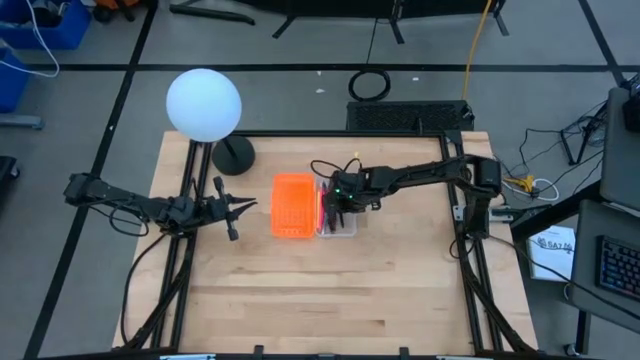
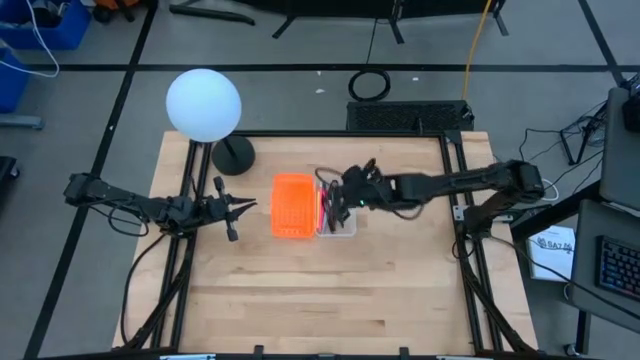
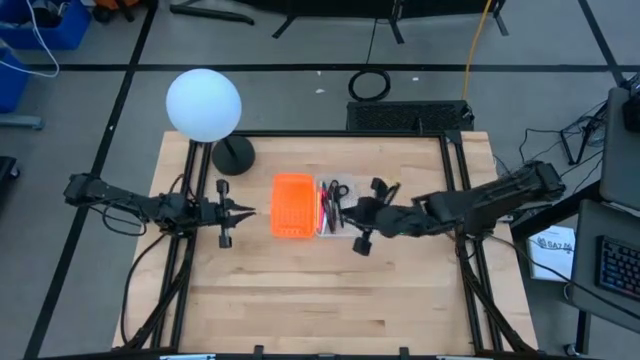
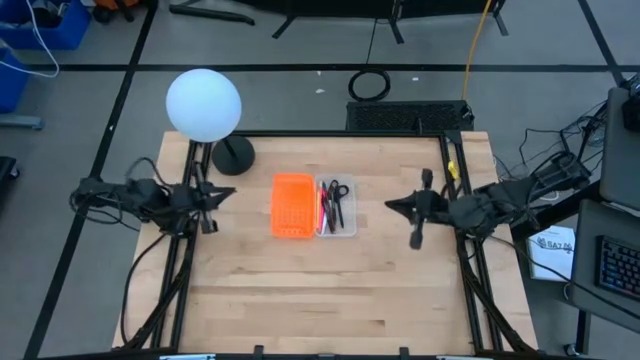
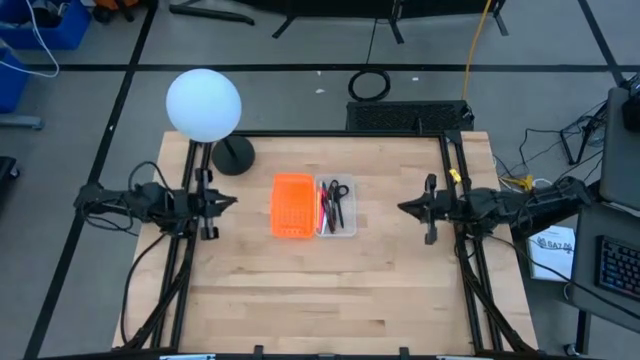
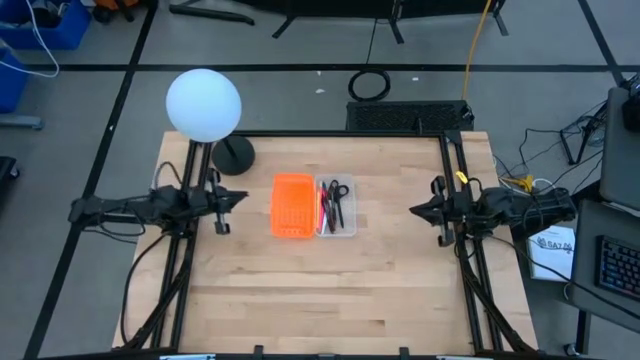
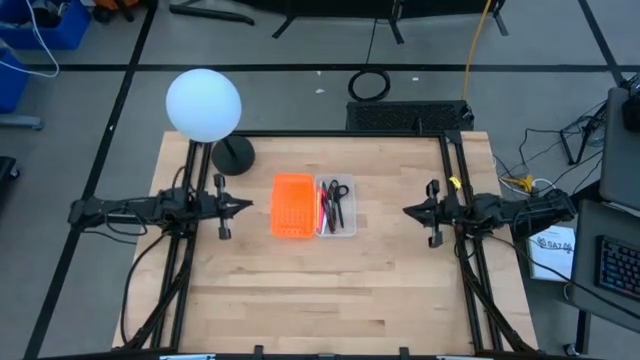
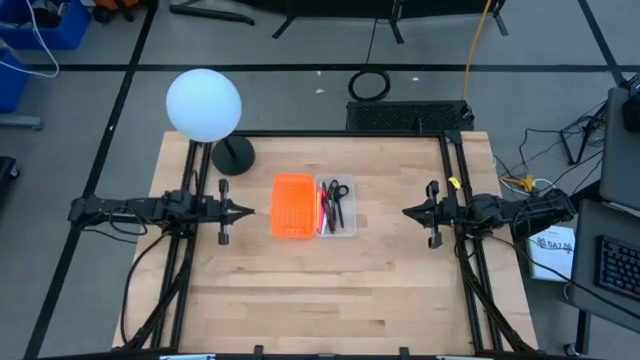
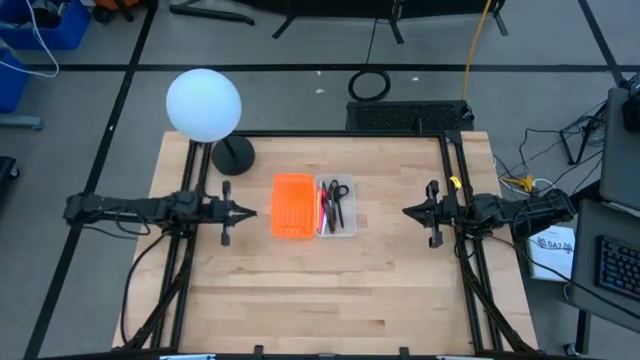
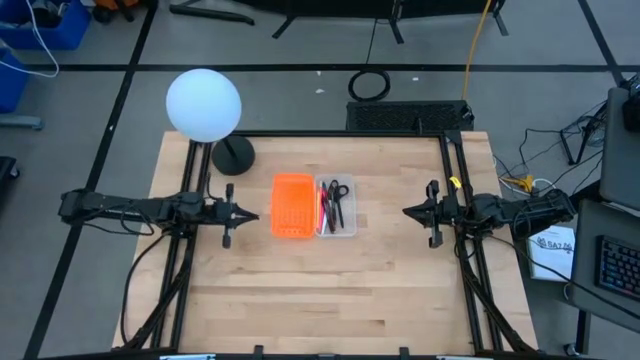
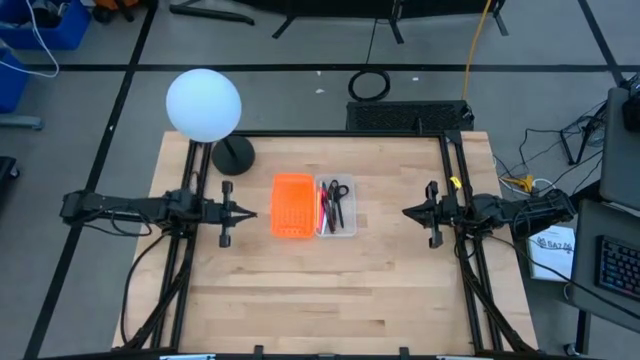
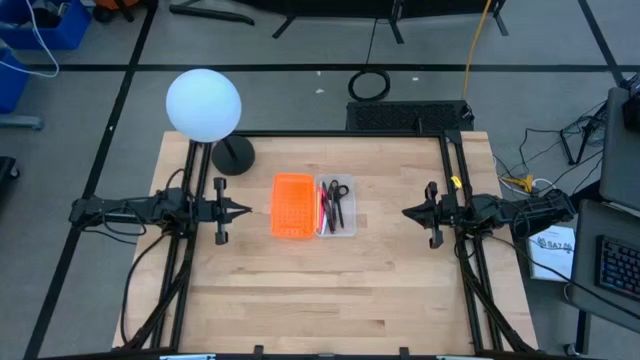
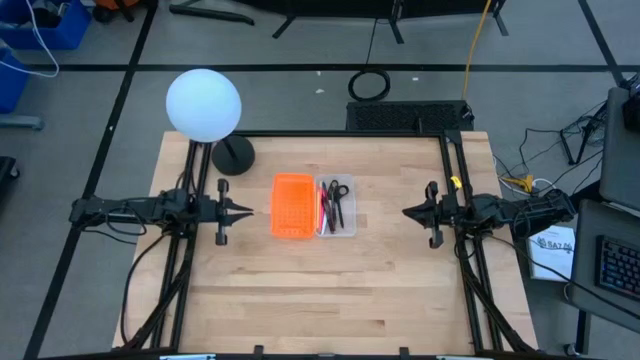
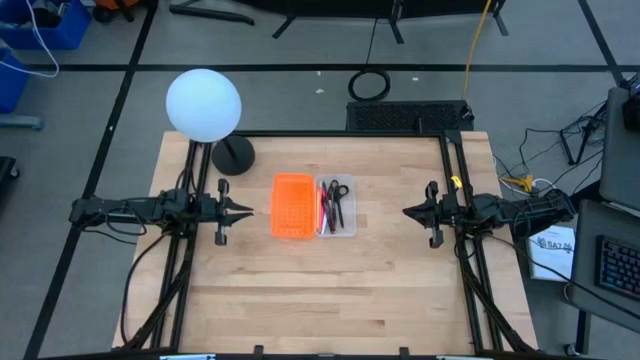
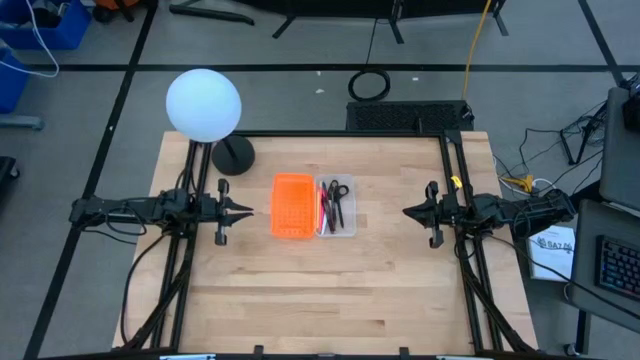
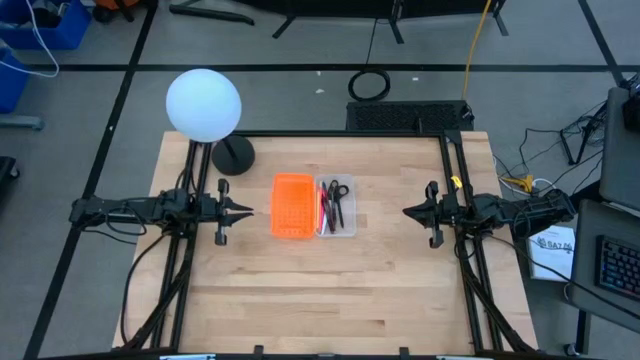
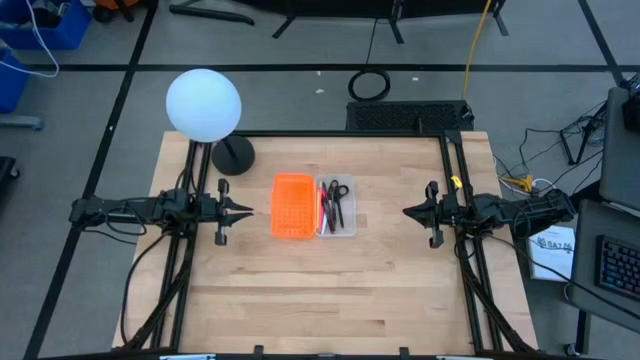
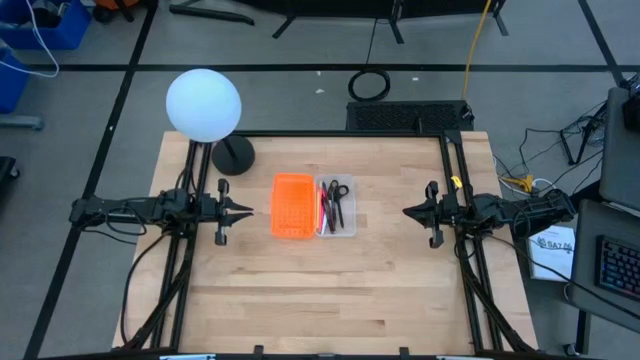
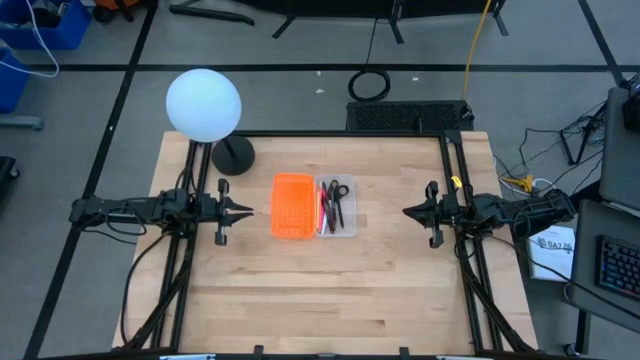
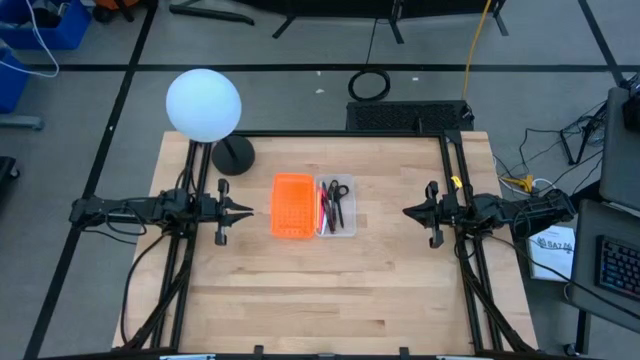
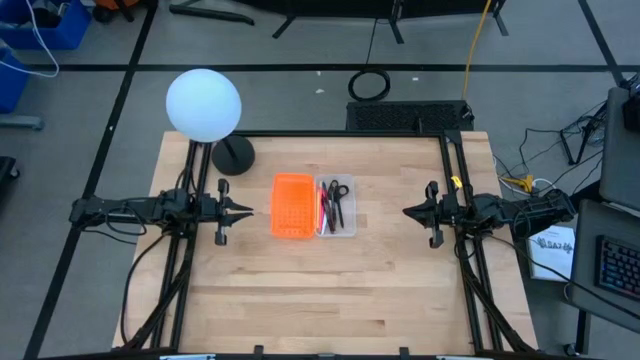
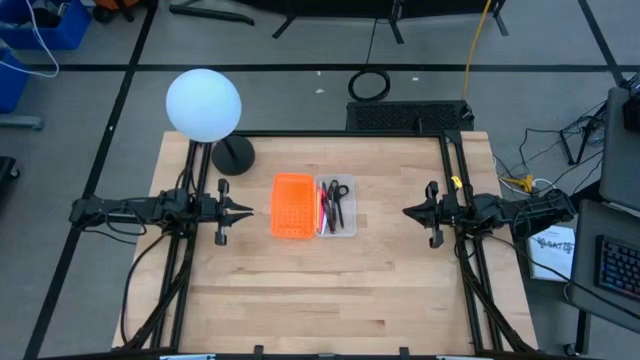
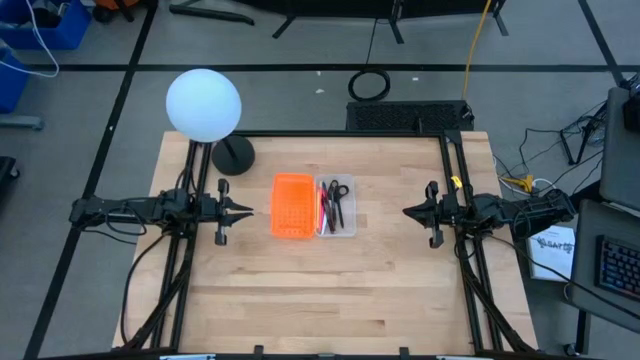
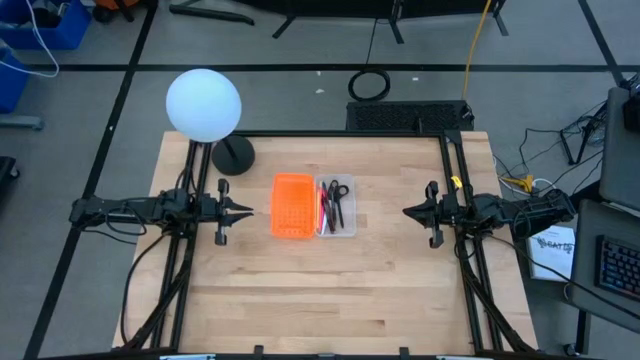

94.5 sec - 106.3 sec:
Task: Pick & place school supplies into a supply box
Return to Home Position

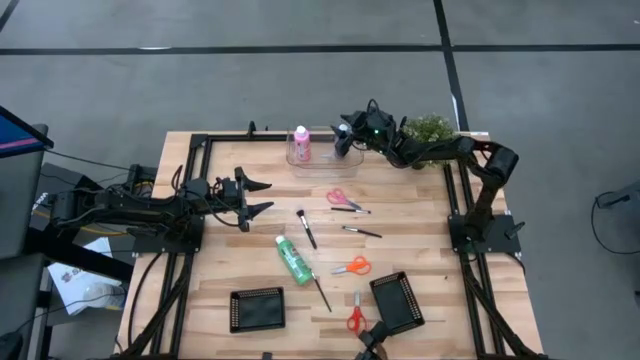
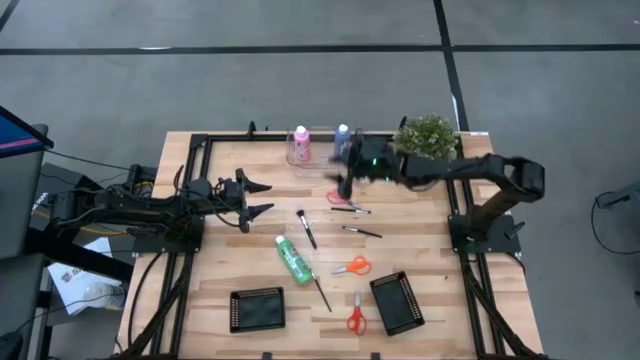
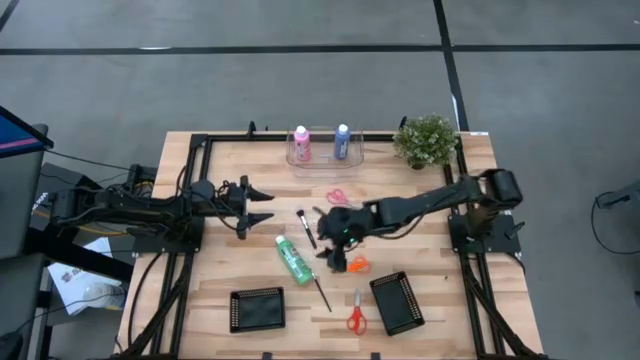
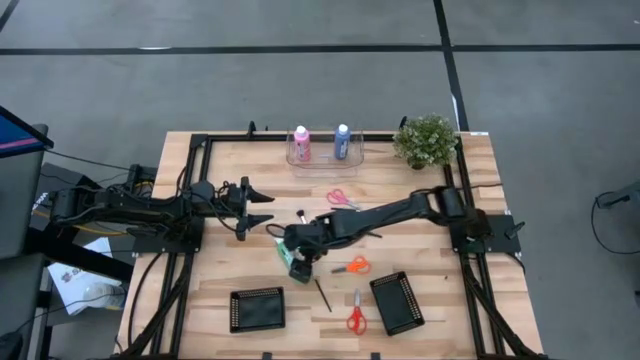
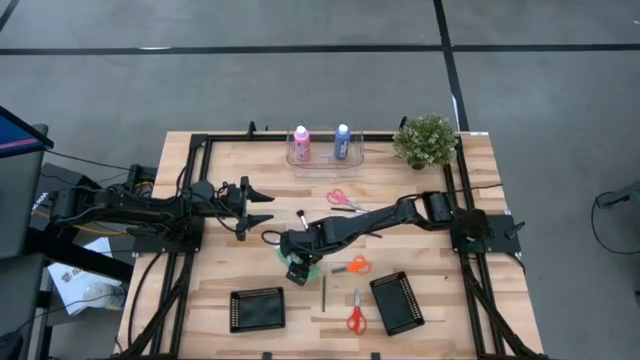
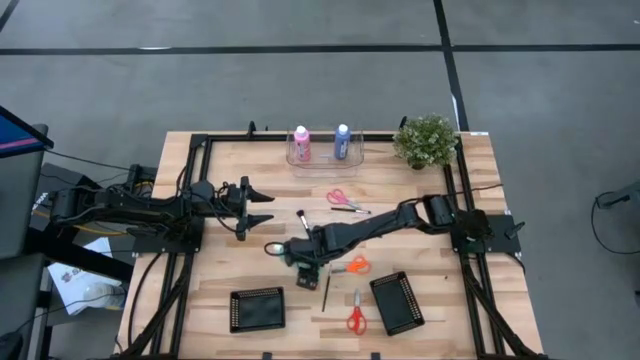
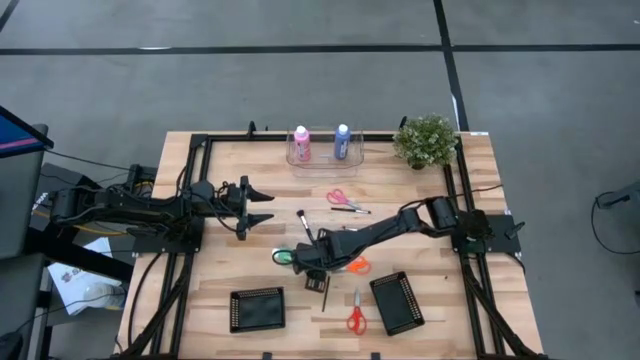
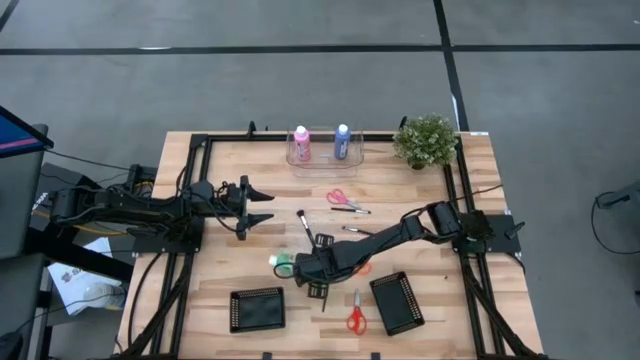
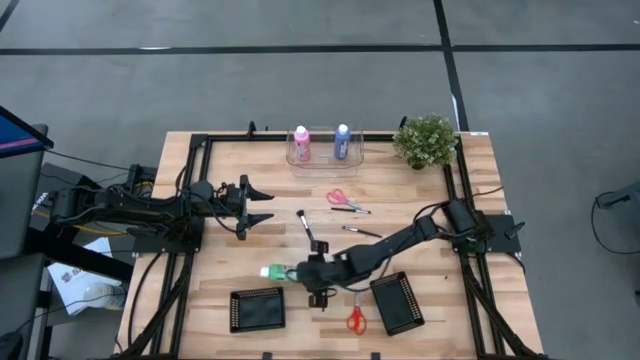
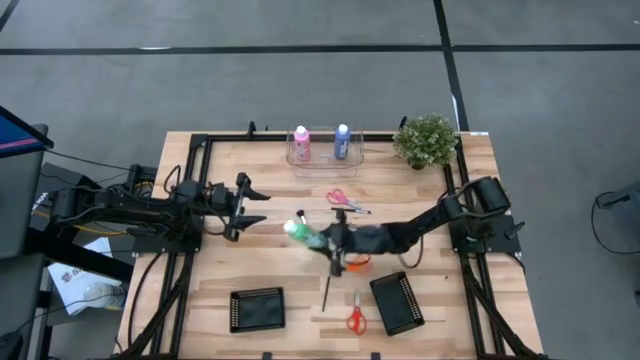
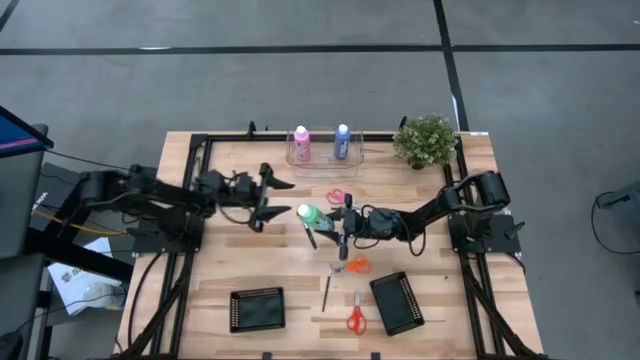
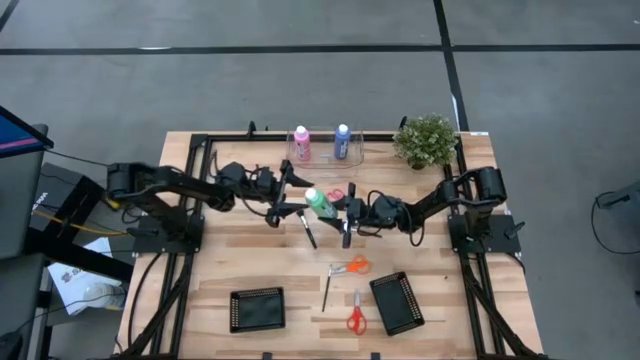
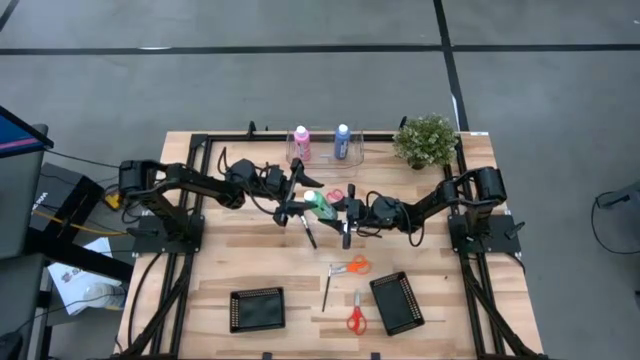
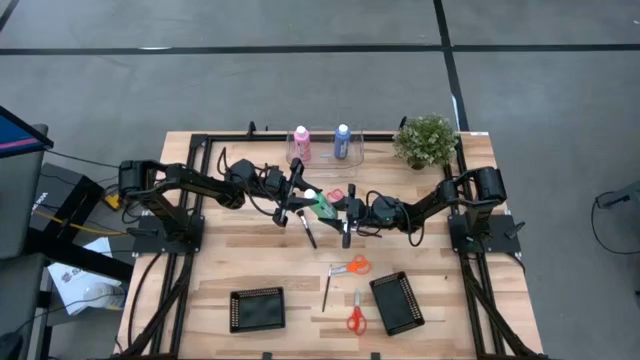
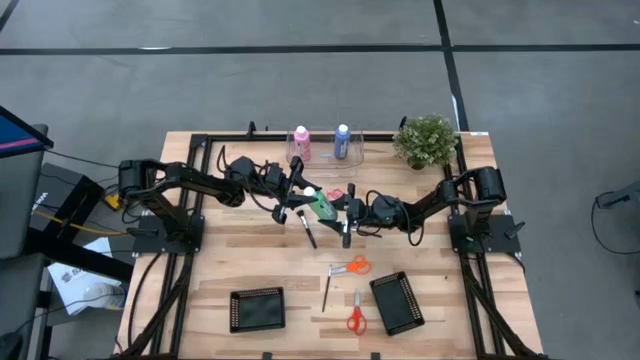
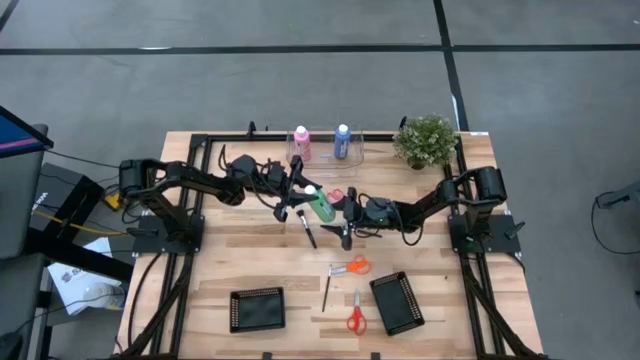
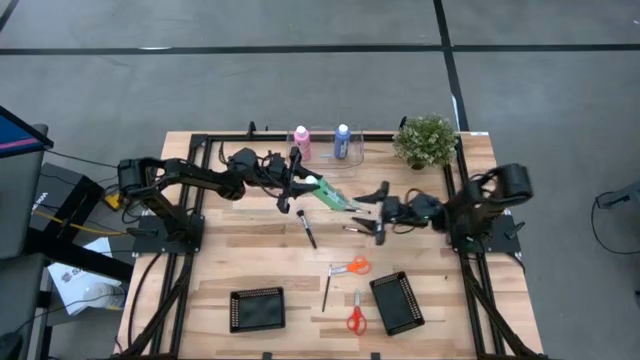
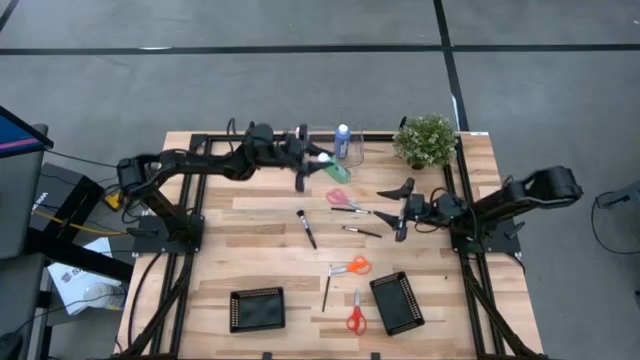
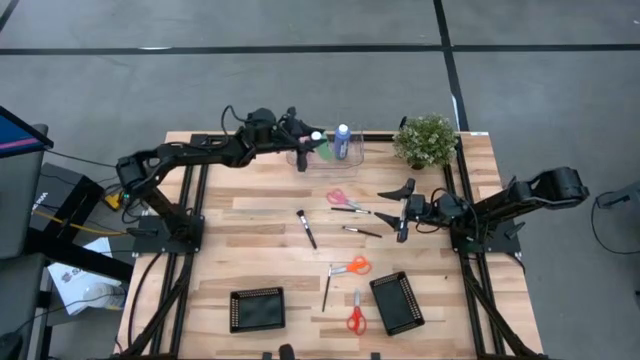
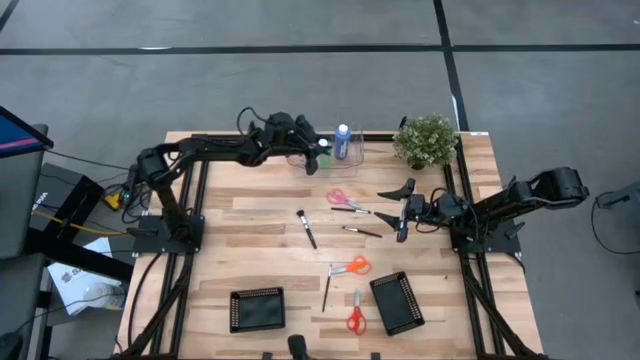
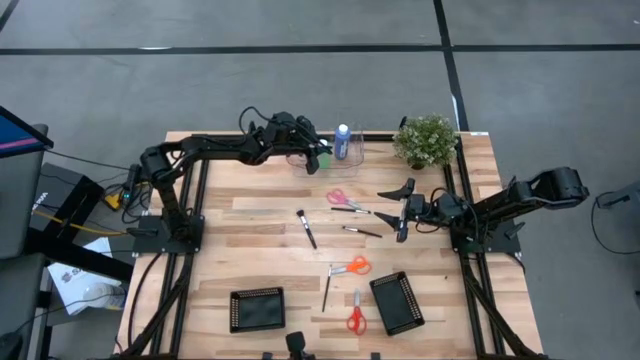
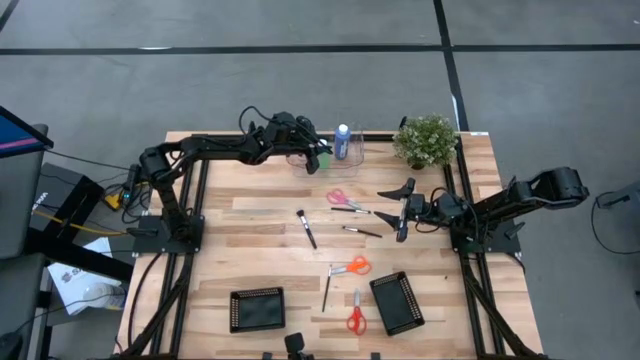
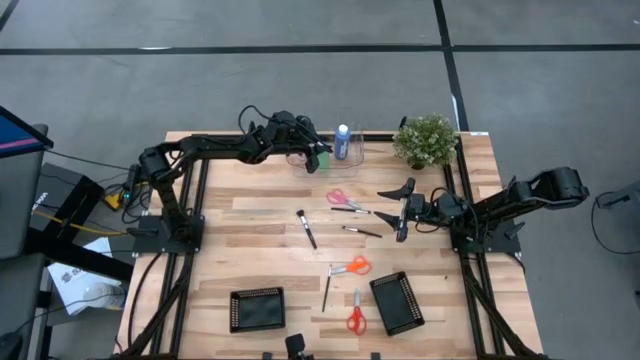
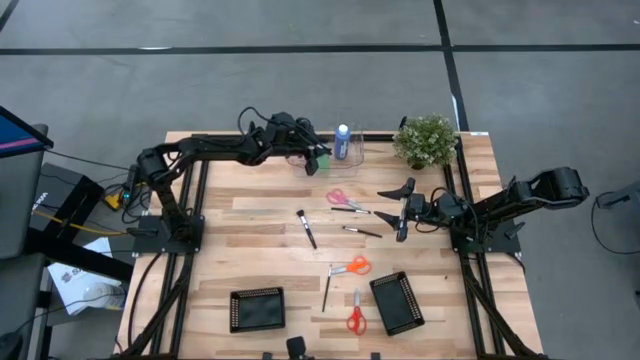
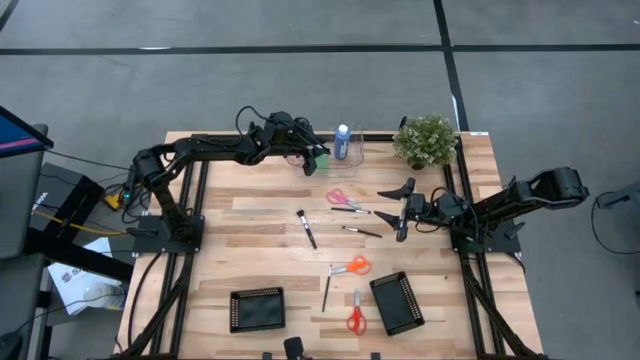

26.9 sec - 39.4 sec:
Task: Pick & Place Paint Supplies
Put the green paint bottle into the transparent bin
